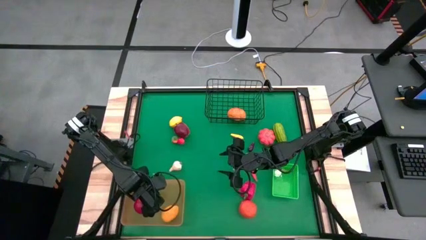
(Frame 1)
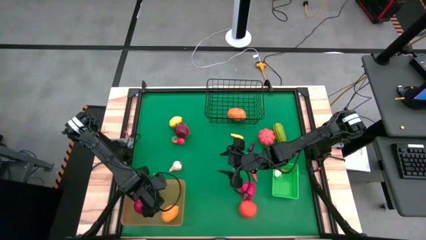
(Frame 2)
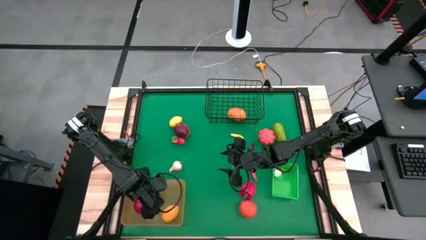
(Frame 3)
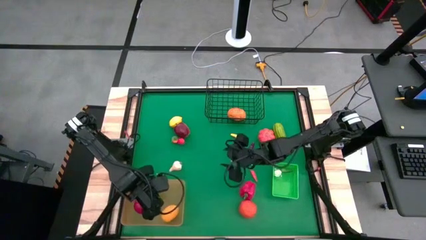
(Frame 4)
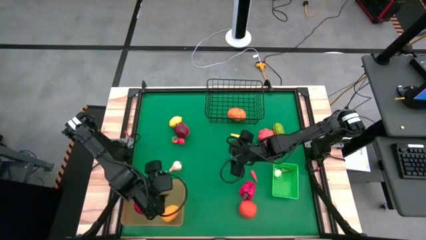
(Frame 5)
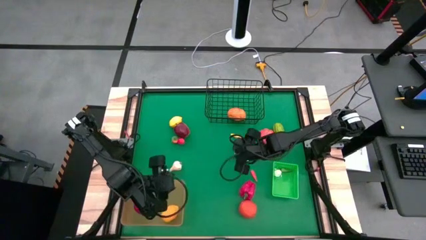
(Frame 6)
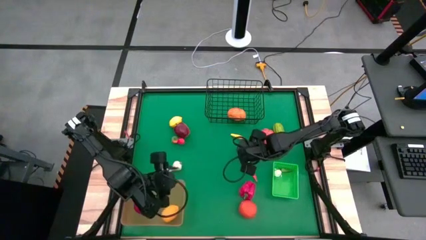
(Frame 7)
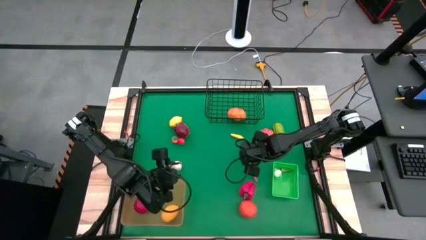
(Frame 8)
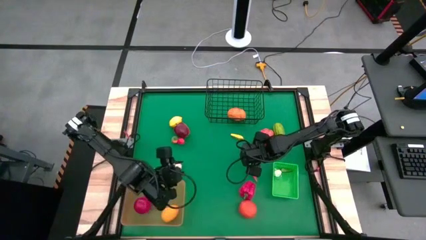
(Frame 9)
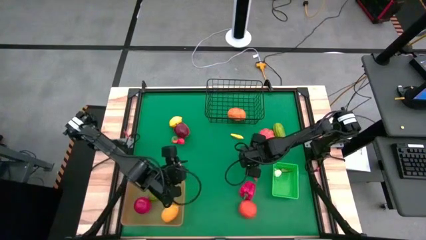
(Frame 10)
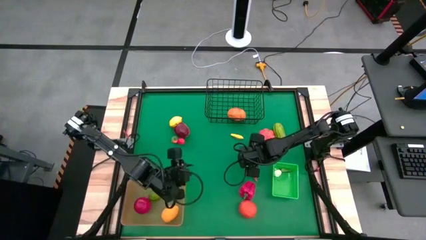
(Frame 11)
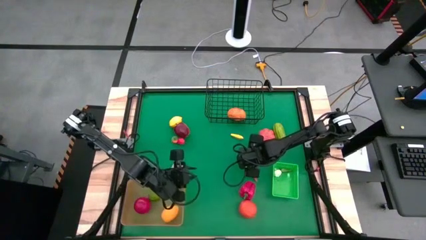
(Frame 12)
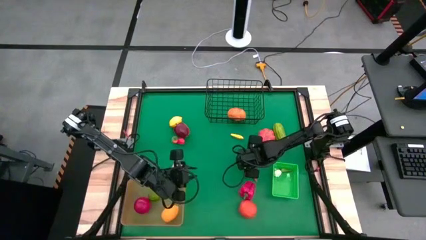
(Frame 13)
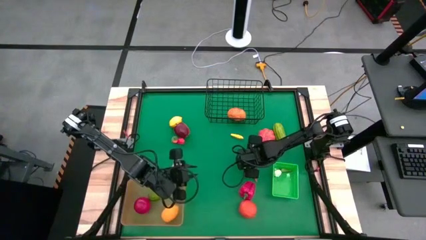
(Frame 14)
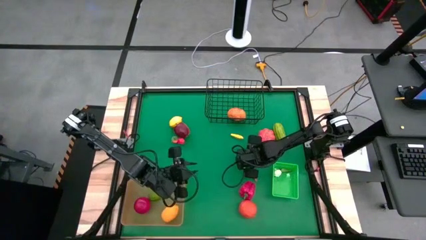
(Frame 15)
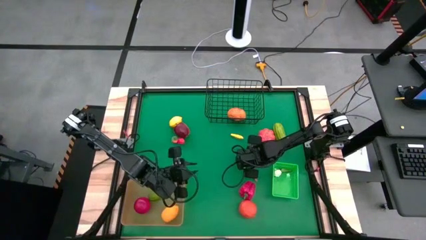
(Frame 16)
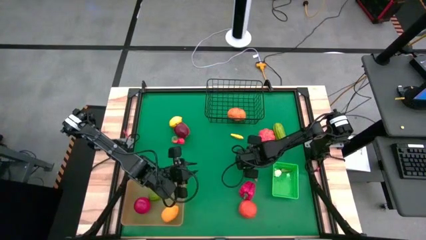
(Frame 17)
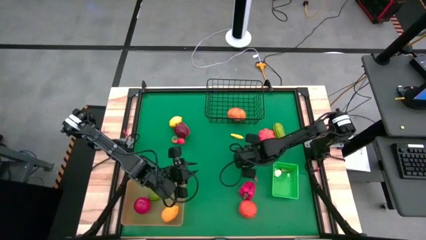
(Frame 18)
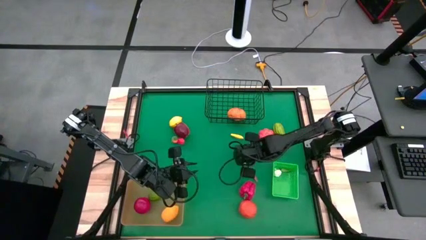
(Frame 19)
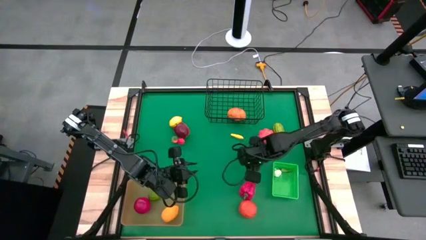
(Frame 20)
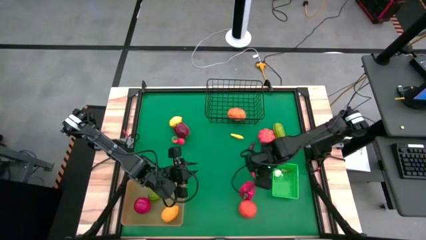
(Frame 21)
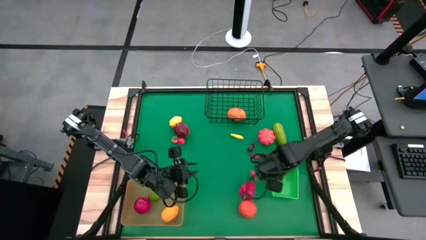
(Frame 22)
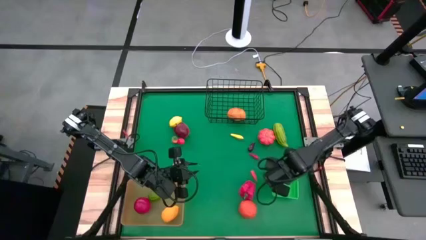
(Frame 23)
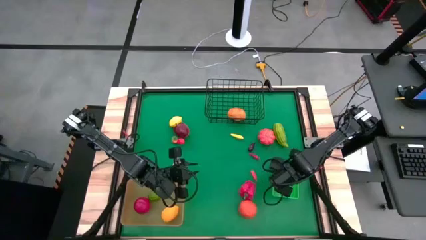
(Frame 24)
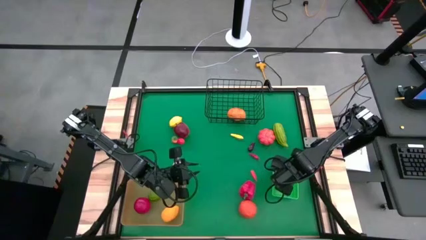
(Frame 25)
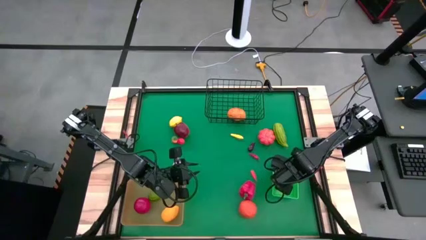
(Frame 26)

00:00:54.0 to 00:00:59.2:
Task: Sort produce into baskets
Put the green chili pepper into the green basket

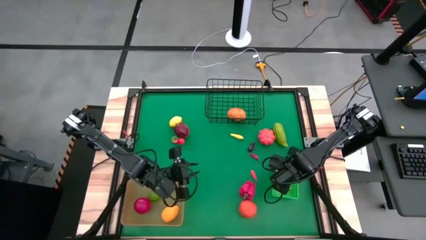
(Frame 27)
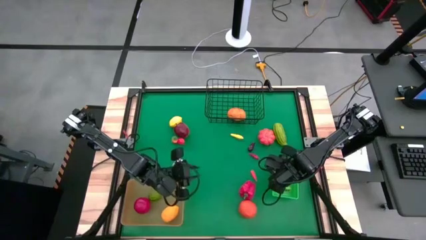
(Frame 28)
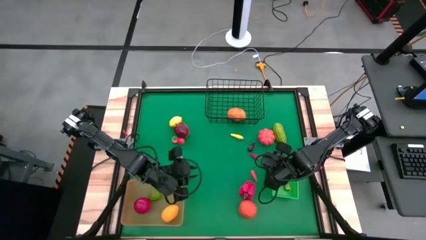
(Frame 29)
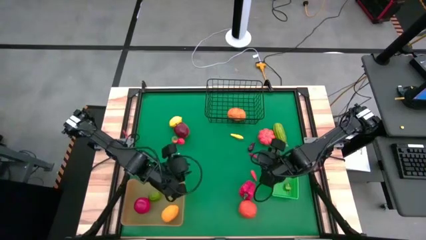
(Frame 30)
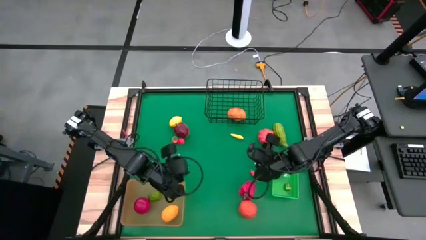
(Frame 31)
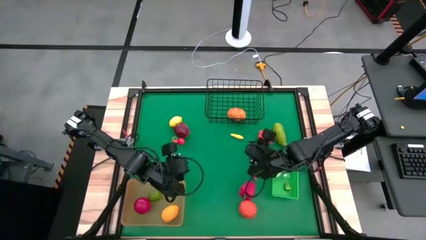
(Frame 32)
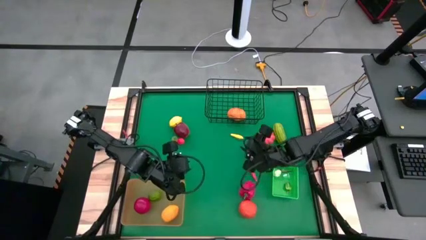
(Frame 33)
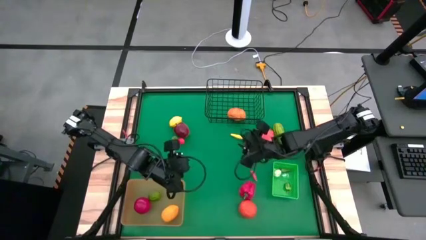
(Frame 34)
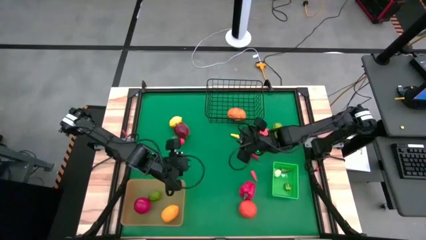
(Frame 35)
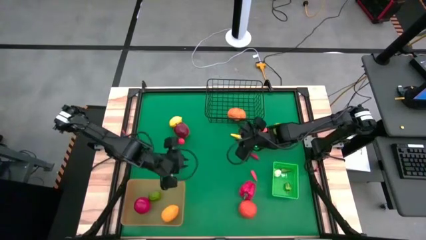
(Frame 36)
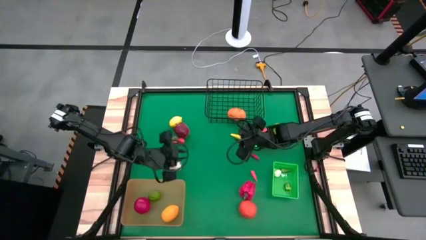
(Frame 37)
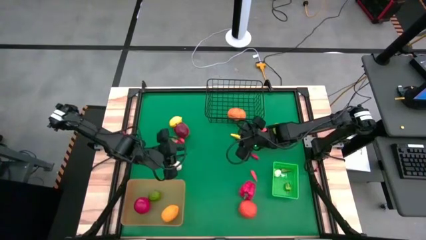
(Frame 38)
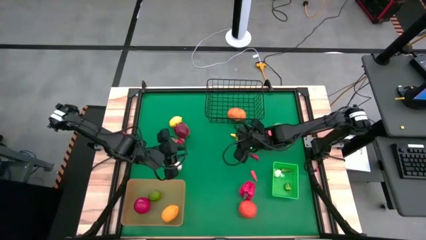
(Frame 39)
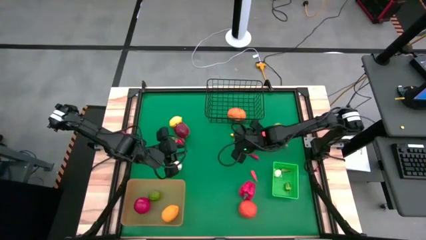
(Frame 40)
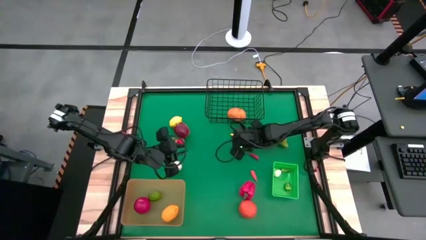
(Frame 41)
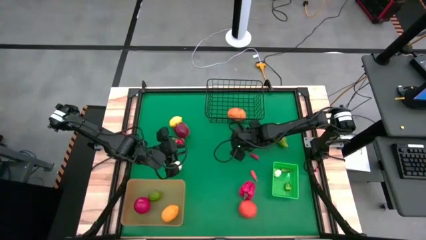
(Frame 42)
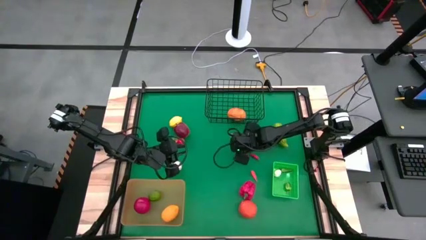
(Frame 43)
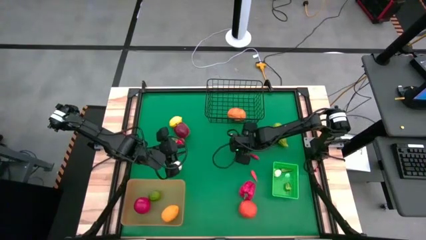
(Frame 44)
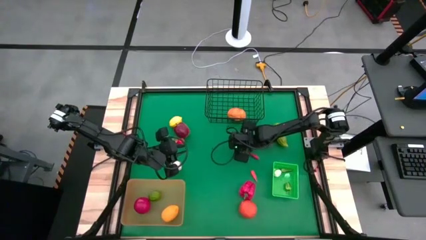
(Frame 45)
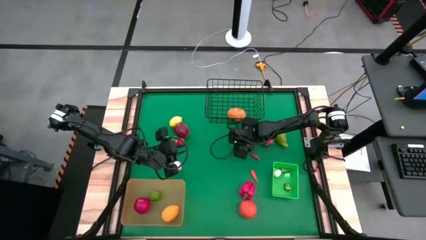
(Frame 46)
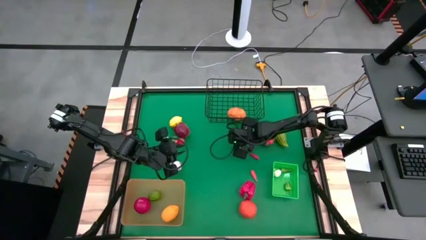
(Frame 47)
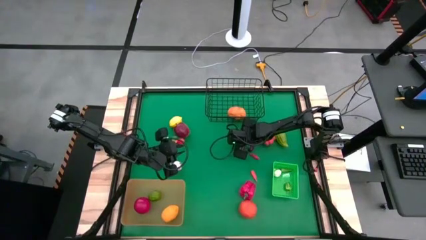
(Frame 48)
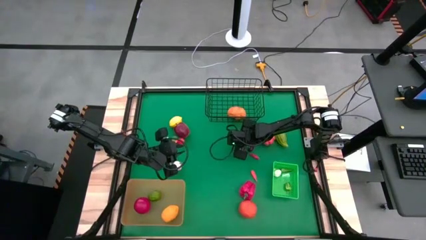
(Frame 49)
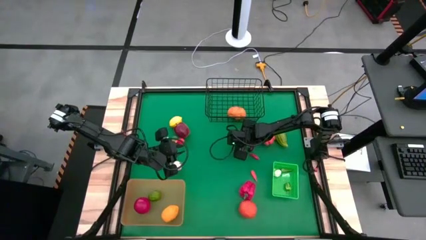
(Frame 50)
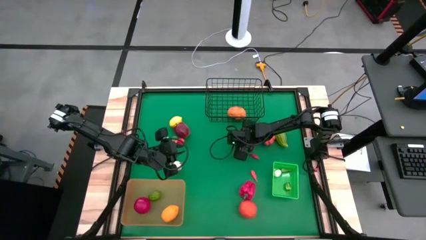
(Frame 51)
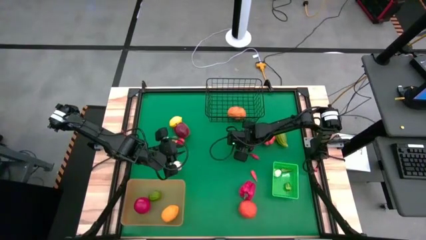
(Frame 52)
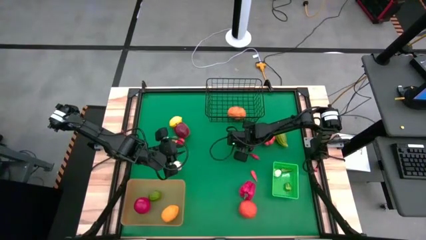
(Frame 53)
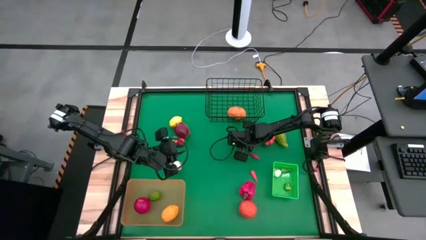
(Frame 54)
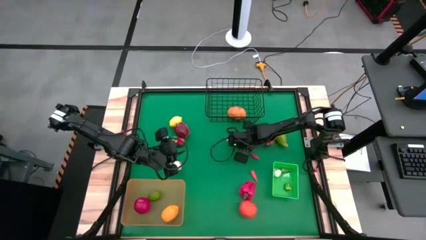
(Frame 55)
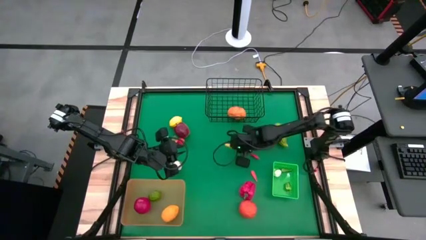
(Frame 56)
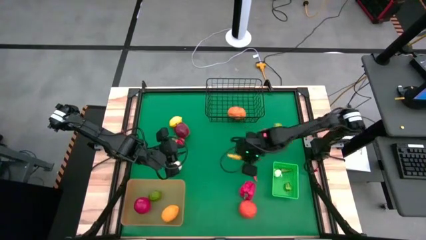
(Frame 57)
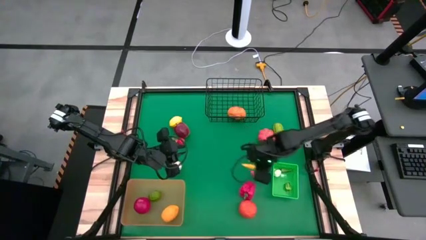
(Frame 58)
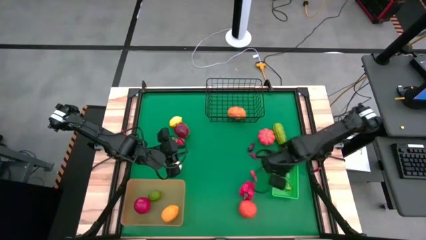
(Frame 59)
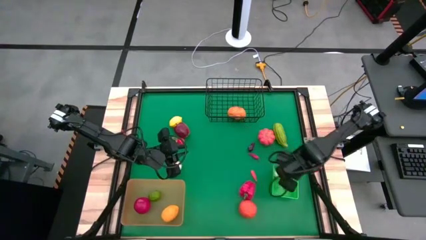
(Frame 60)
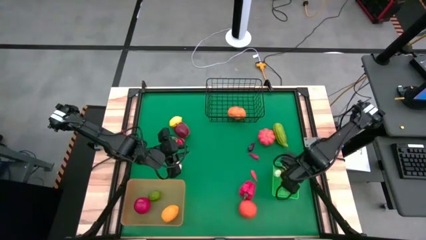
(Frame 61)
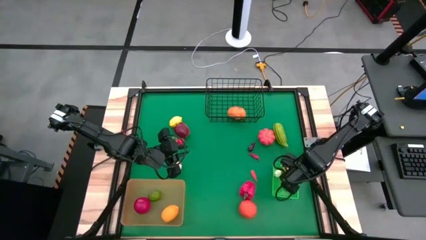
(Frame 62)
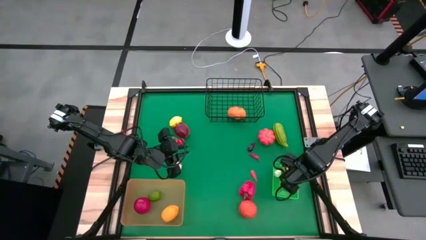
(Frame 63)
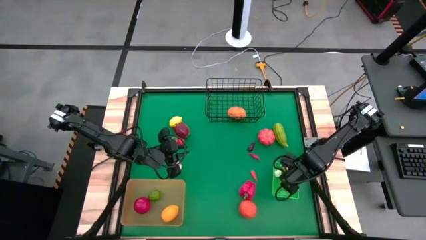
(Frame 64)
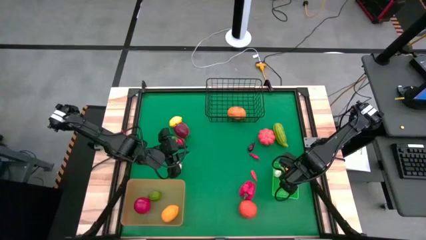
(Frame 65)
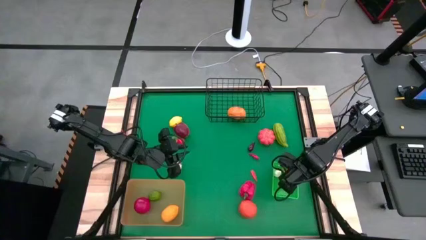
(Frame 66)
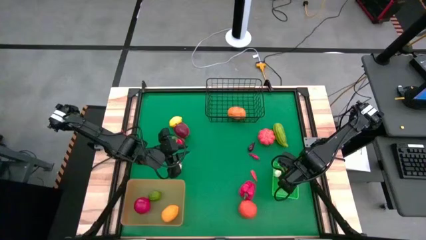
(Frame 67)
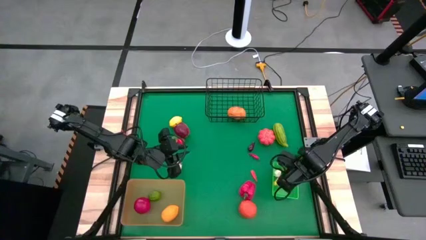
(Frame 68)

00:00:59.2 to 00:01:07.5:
Put the corn into the green basket

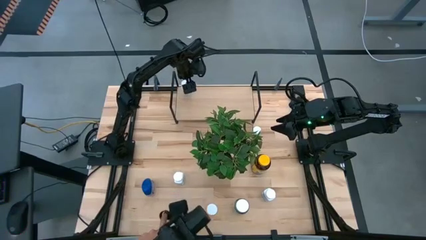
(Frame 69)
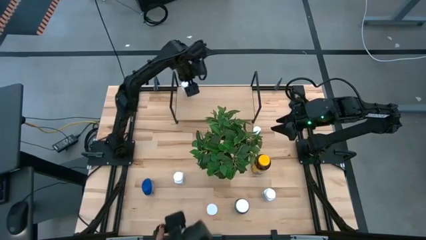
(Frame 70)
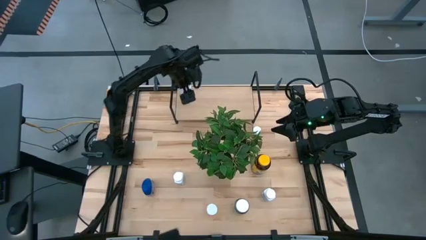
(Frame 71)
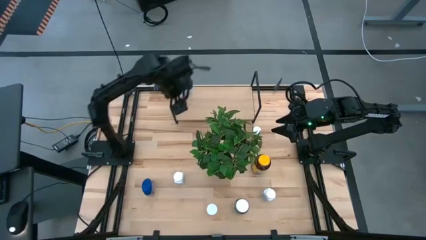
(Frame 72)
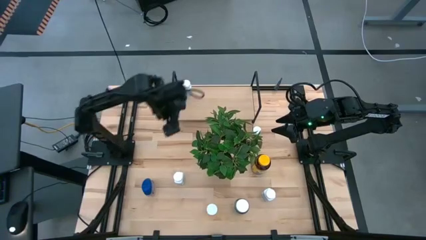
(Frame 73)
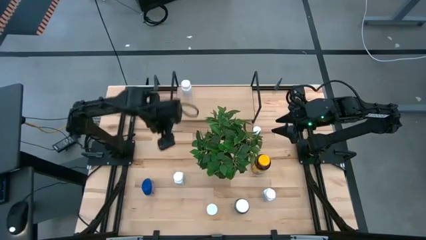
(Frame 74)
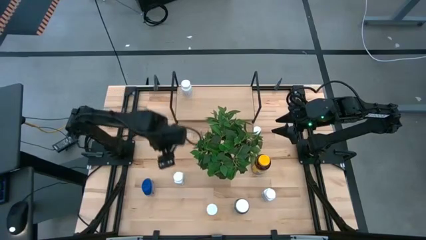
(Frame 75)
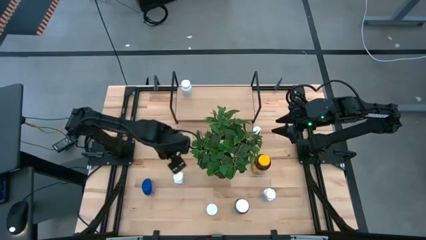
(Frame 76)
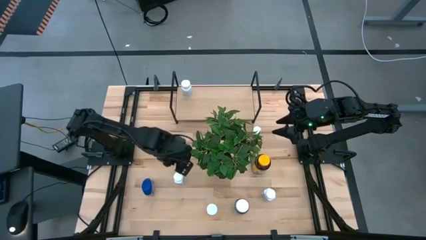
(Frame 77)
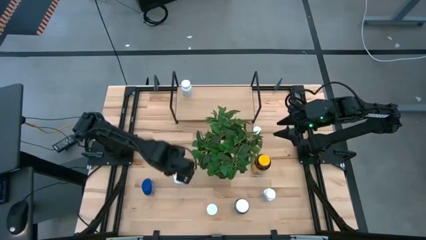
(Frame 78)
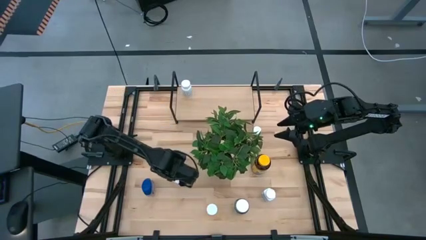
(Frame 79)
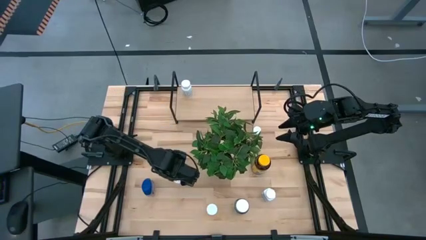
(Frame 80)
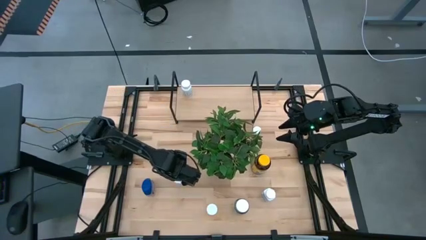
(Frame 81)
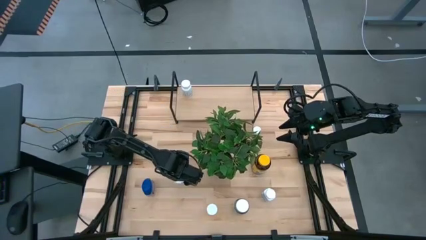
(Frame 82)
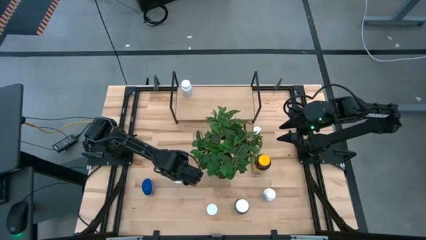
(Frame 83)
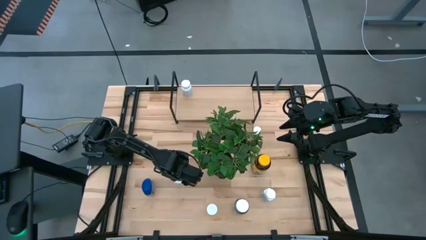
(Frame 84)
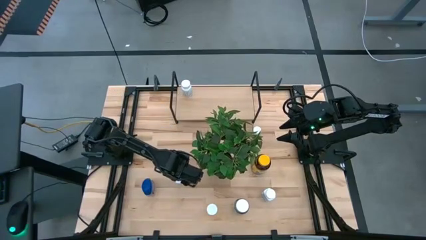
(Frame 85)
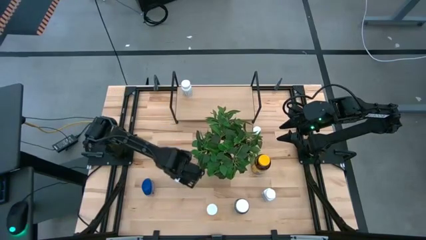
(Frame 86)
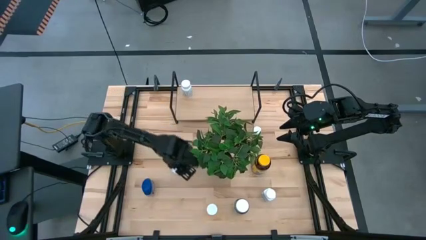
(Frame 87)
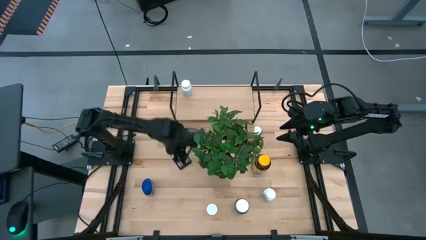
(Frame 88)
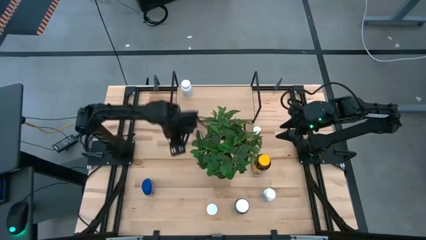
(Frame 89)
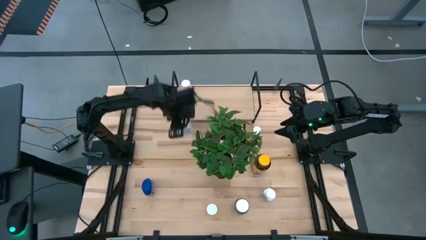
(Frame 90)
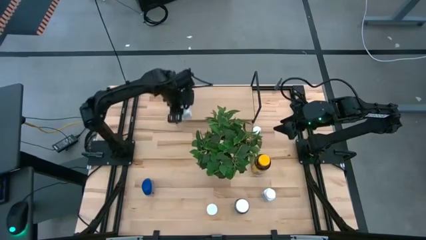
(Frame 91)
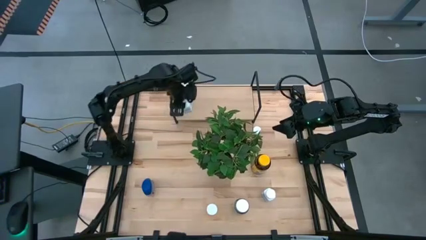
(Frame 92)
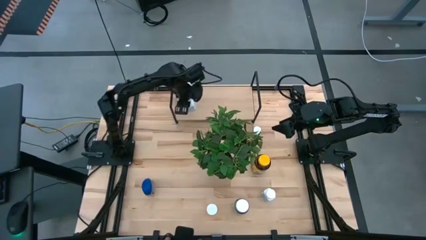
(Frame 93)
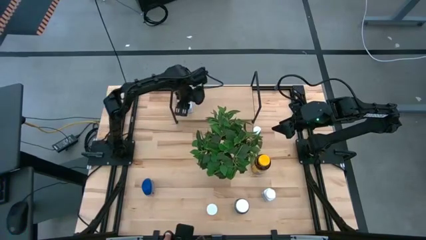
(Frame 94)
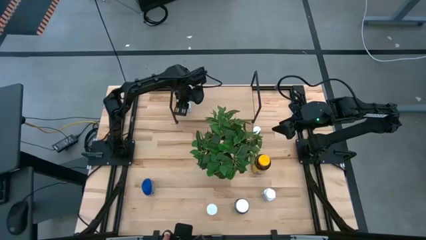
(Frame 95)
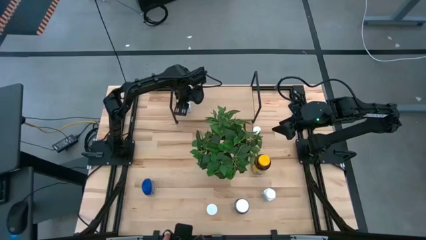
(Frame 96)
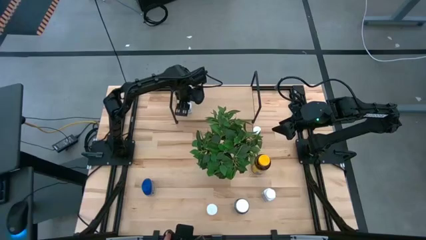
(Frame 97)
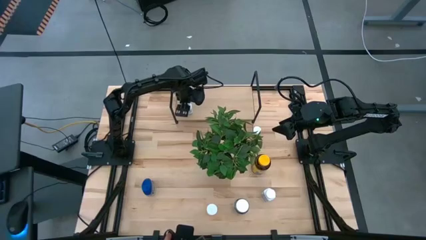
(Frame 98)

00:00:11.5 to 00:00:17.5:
Task: Pick and place medicine bottles onto shelf by color
Put the left white blue pill bottle on the shelf
